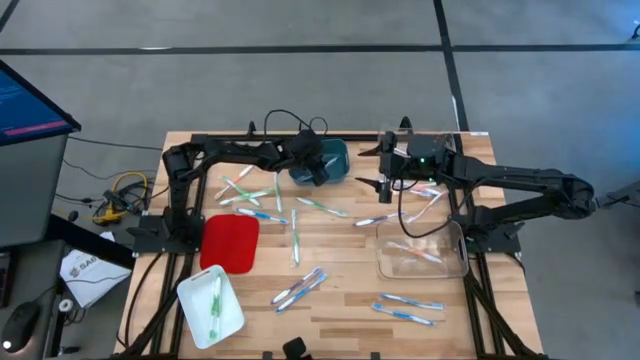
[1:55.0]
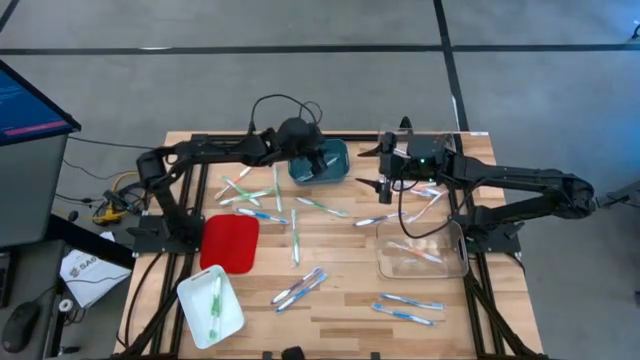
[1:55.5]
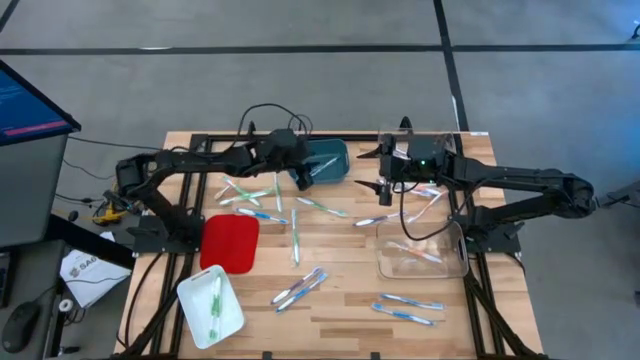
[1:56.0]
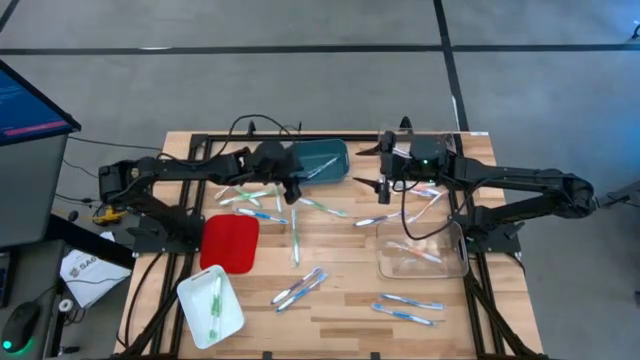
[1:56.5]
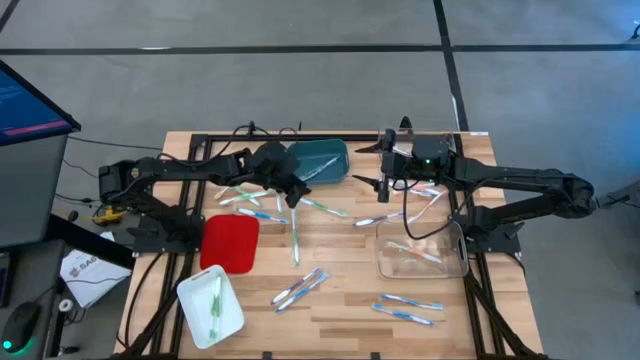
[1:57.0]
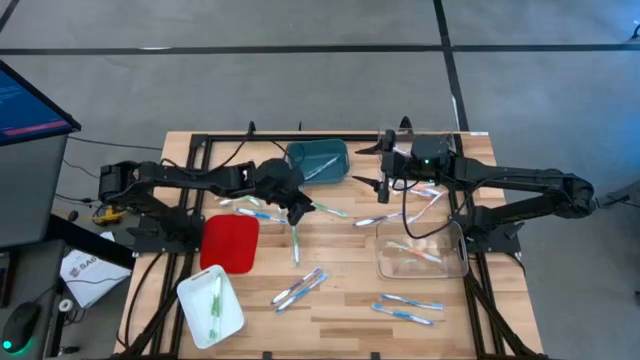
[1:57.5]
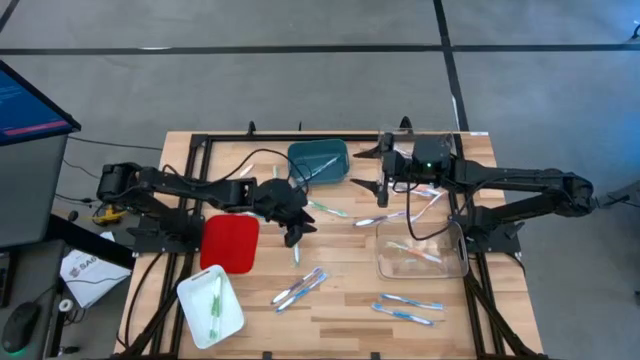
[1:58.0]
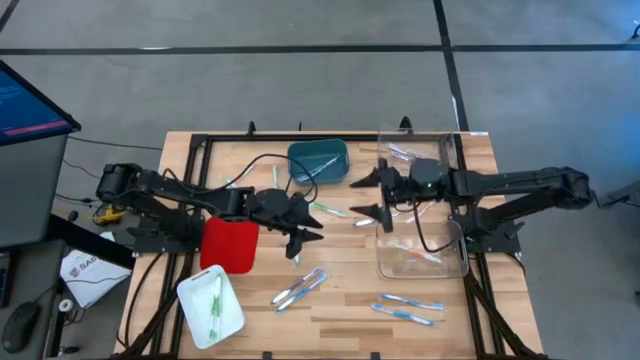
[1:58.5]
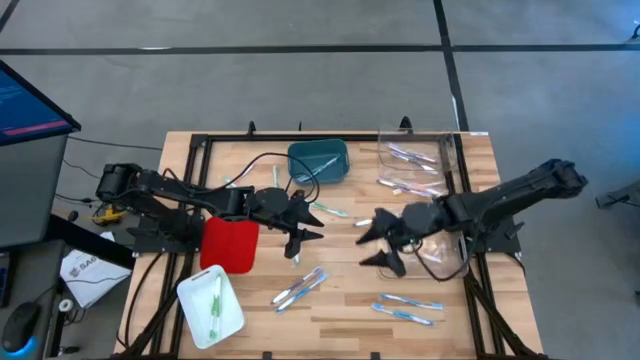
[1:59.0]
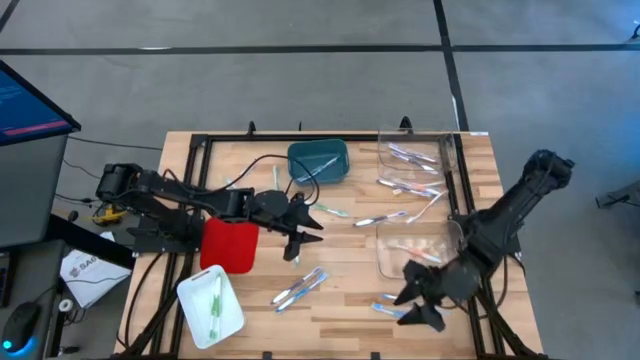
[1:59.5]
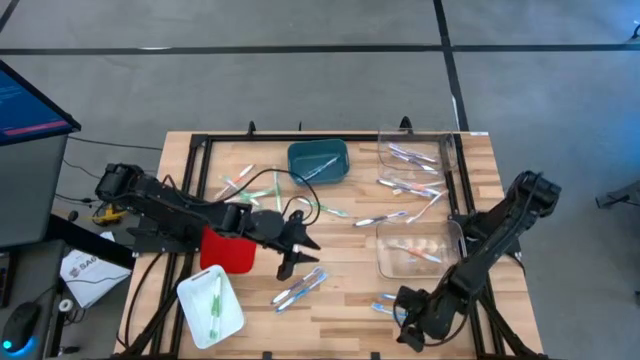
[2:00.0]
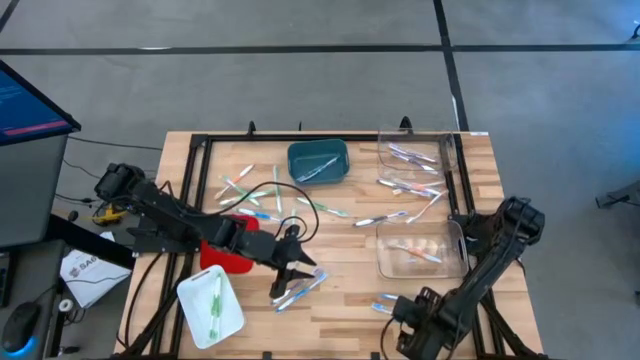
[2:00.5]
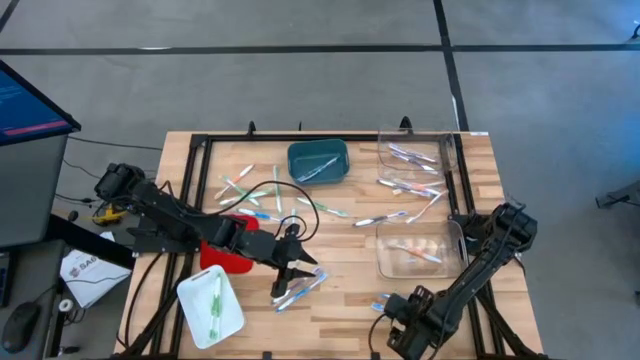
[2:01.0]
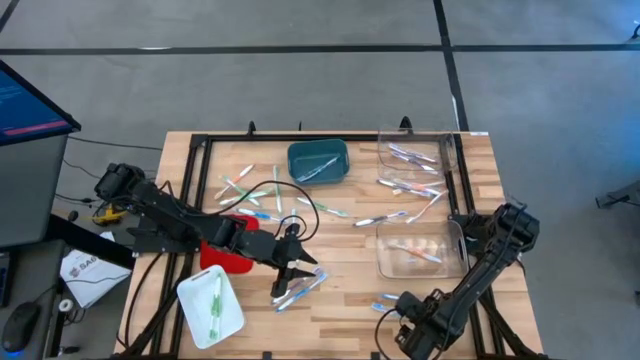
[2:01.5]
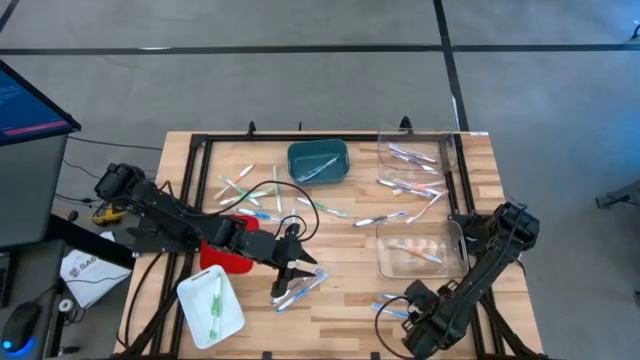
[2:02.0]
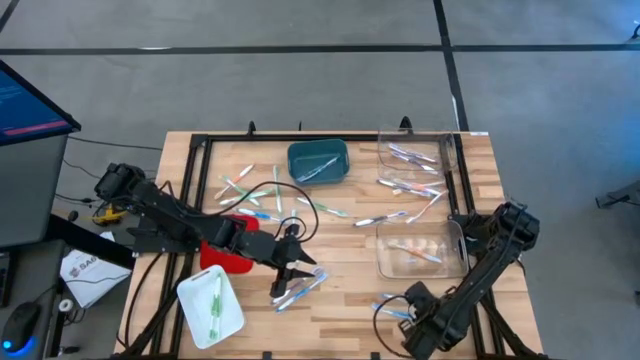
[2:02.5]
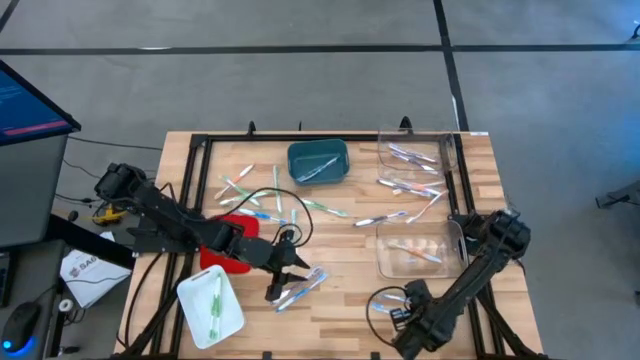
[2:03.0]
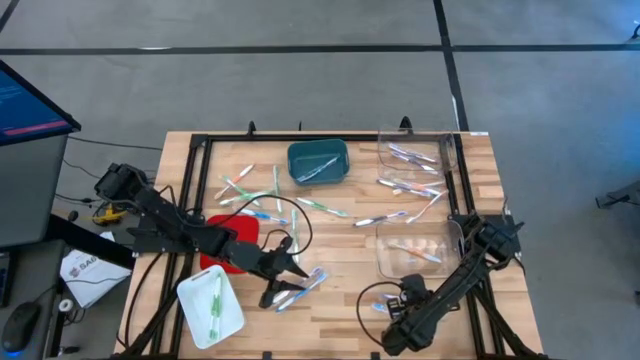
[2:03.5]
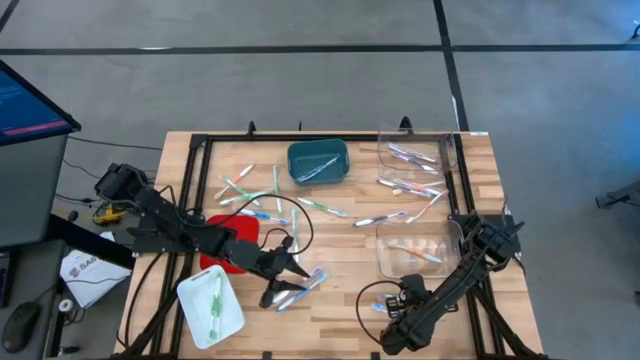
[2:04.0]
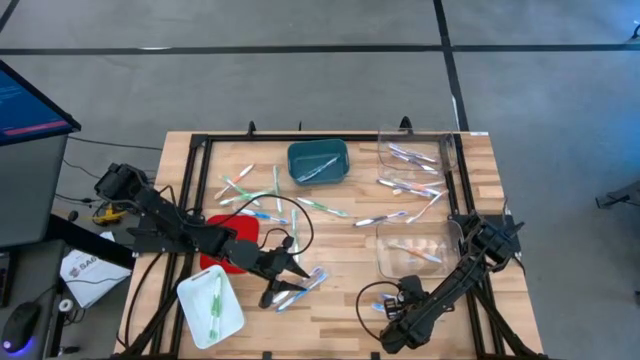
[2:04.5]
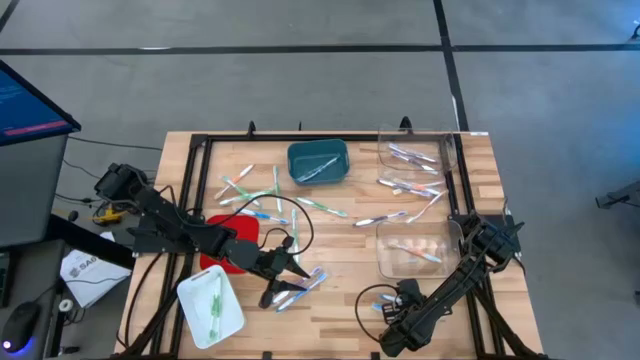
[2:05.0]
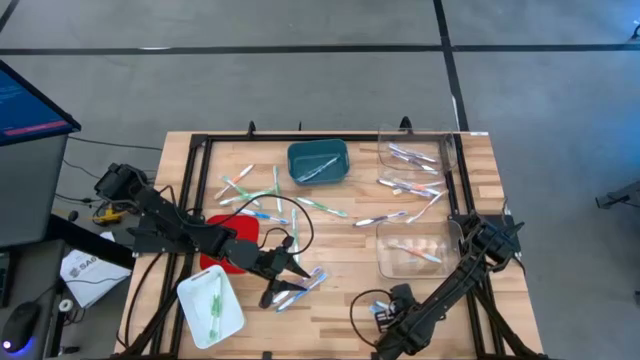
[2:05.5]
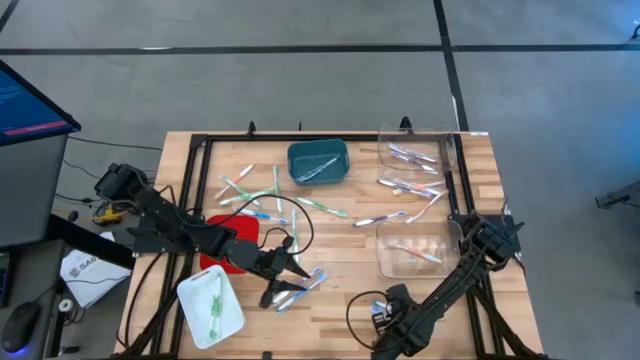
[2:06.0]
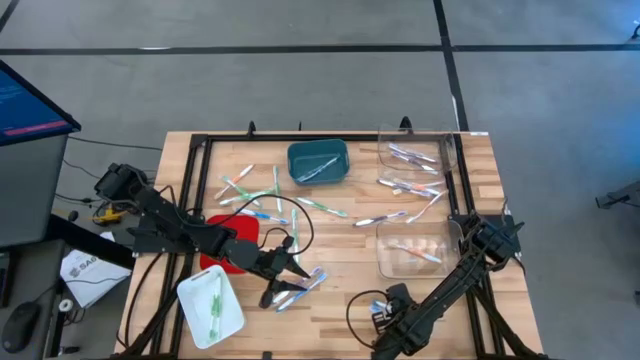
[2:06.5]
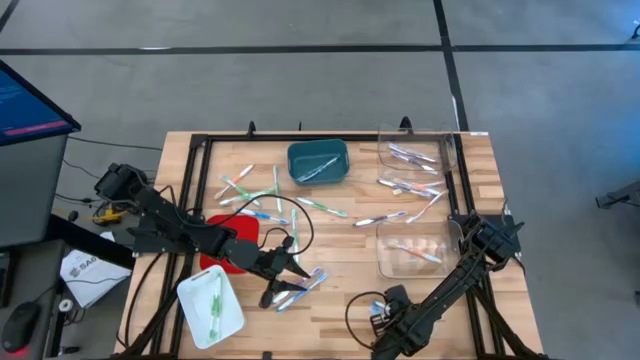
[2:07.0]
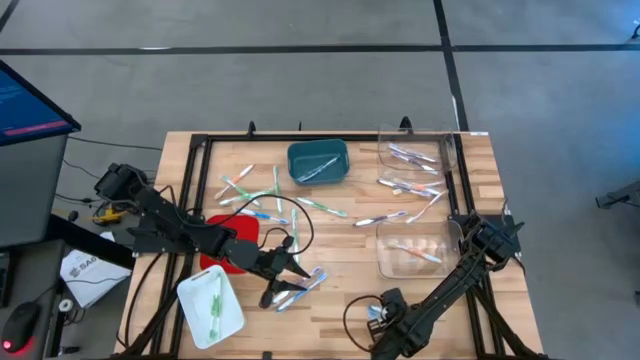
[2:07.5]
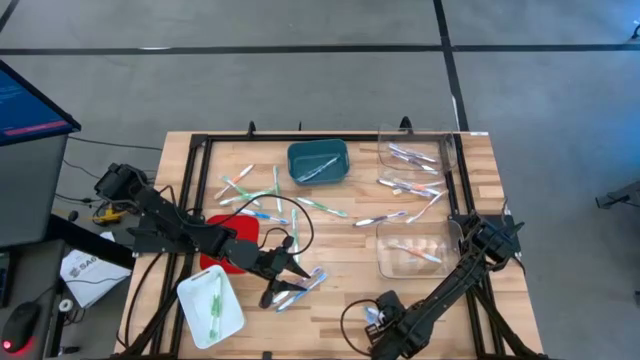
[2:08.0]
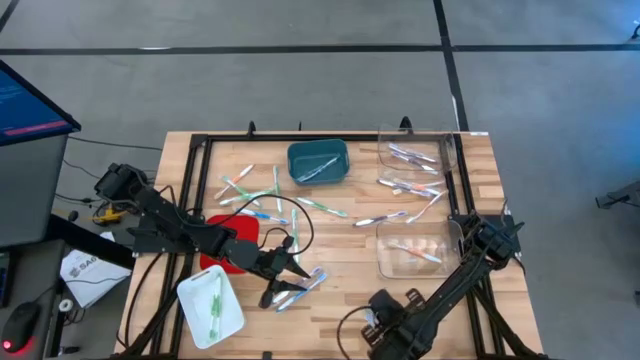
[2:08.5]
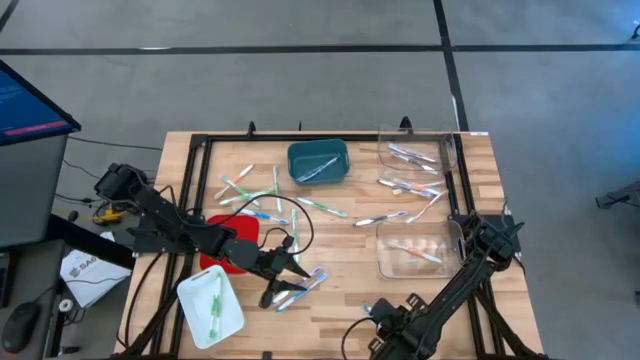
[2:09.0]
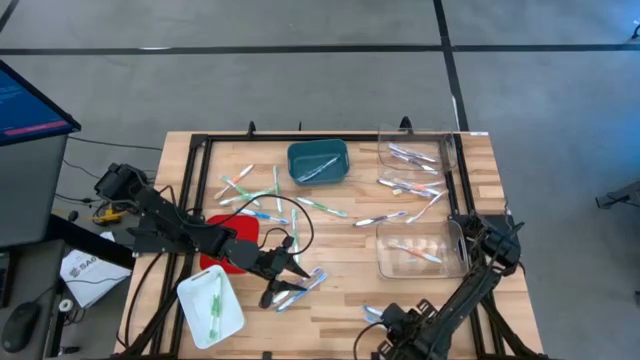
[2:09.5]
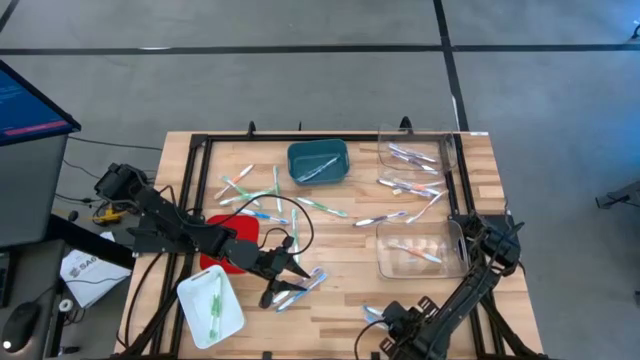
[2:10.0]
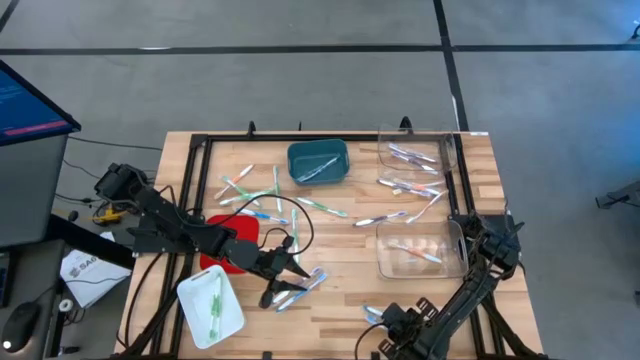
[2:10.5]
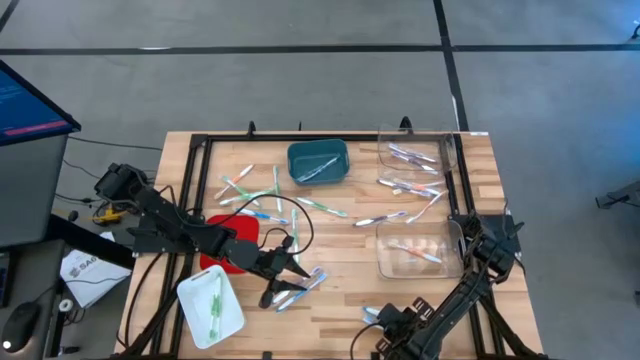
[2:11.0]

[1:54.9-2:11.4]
Task: Pick & Place Toothbrushes
Put the blue toothbrush into the blue bin

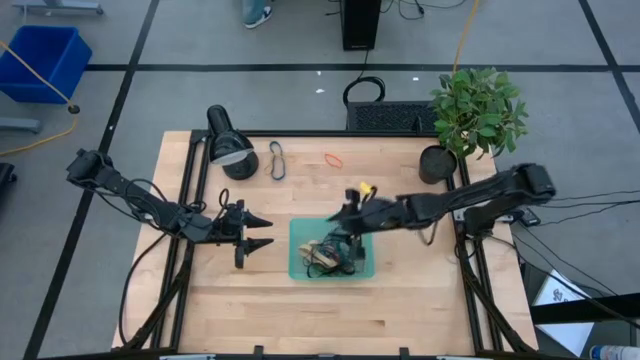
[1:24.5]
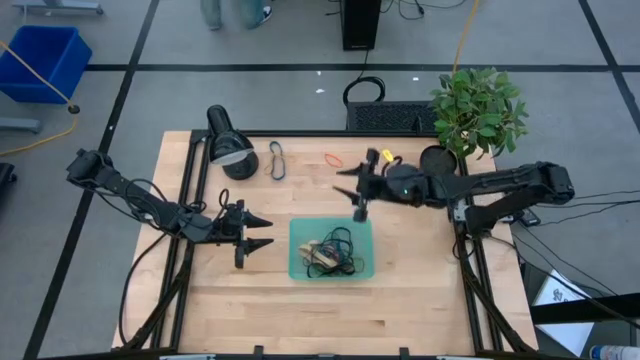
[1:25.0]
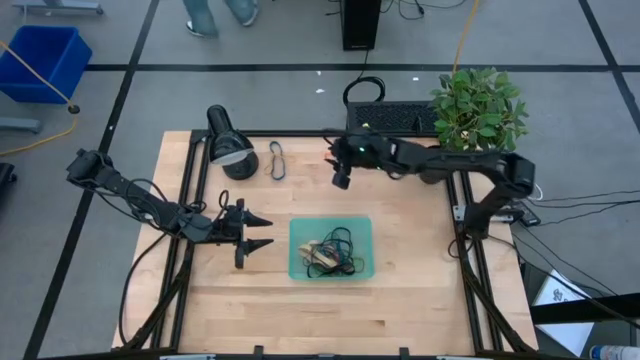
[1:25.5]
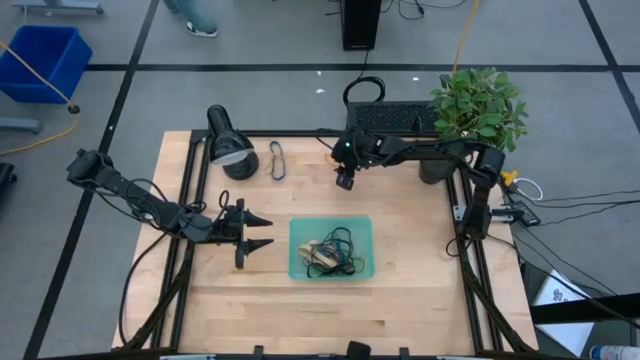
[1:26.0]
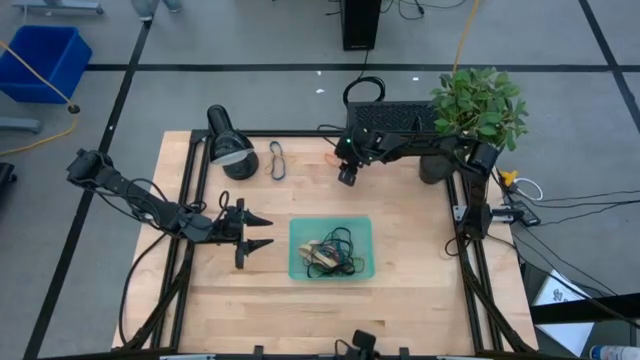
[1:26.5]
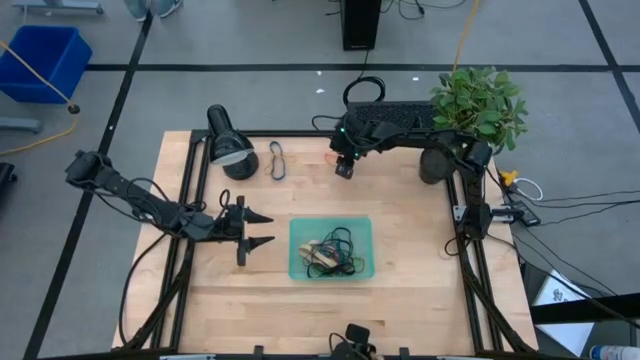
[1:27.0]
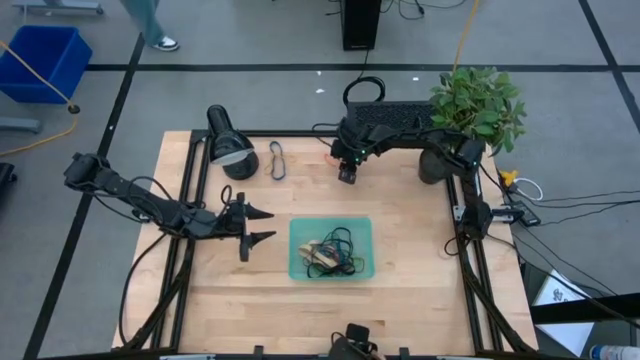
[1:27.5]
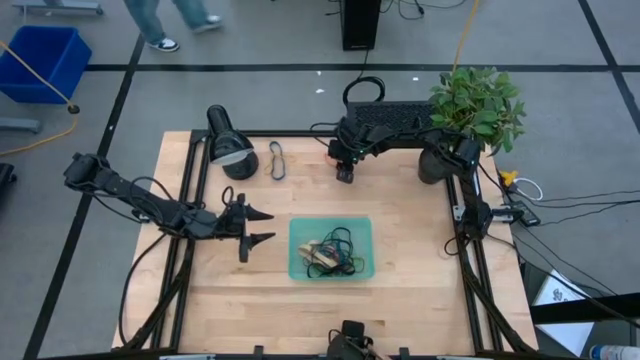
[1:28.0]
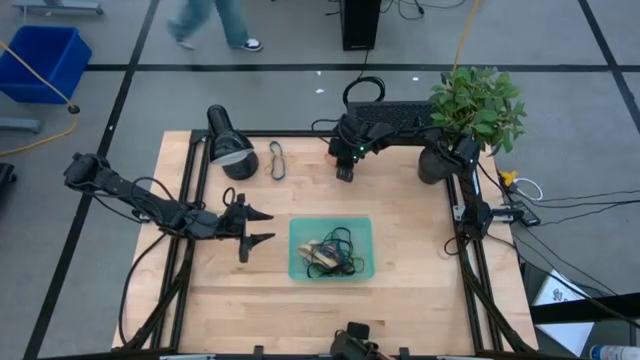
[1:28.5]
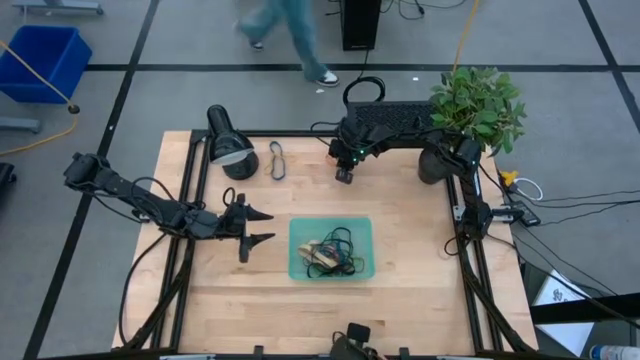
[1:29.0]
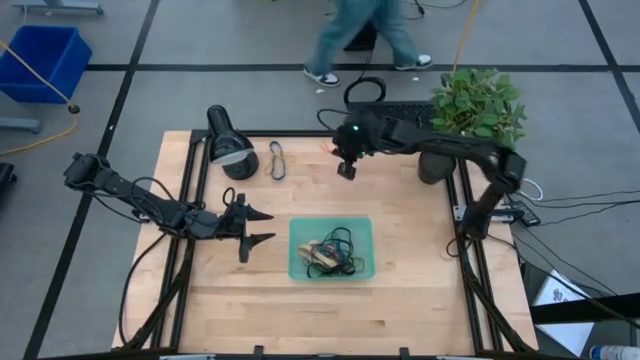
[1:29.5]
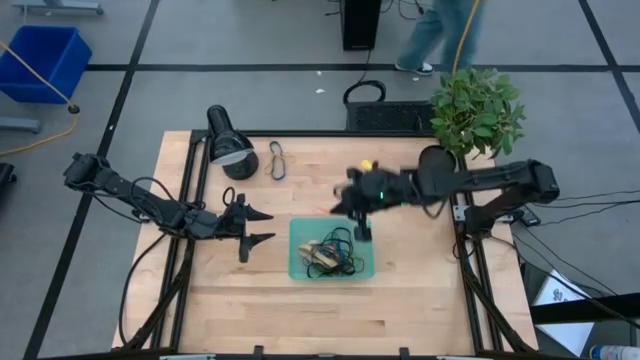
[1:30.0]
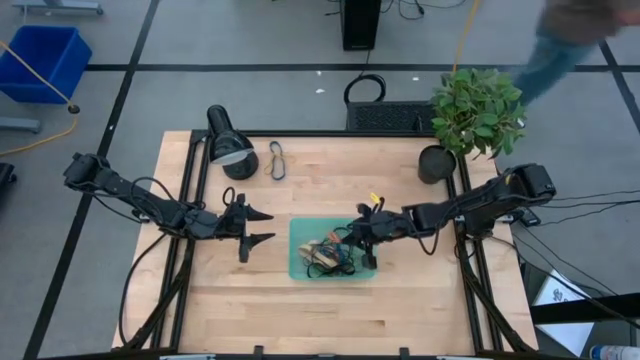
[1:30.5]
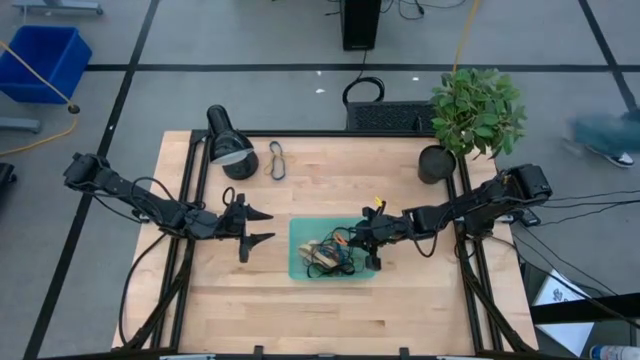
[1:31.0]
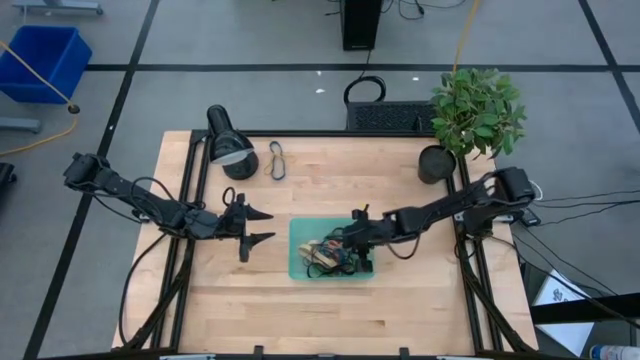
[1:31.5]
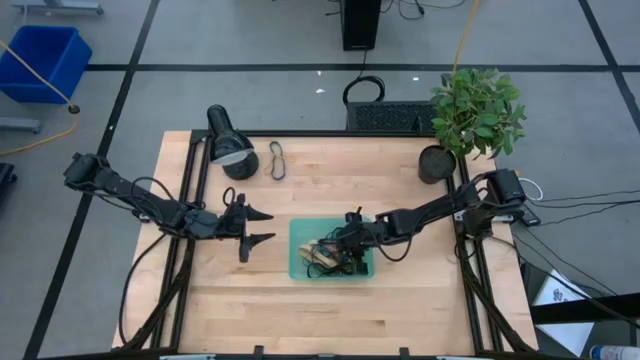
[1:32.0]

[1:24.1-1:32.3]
Task: Pick and place rubber bands into bin
Put the orange rubber band into the green bin
